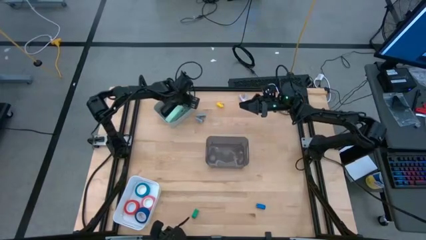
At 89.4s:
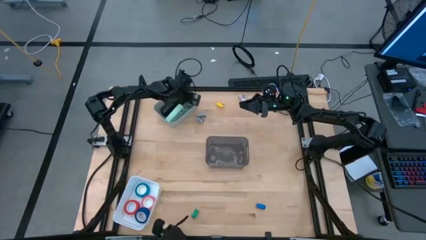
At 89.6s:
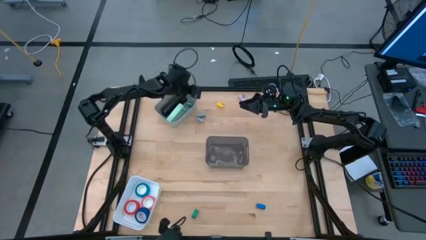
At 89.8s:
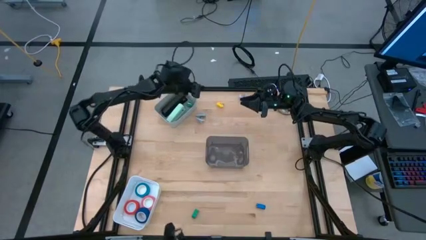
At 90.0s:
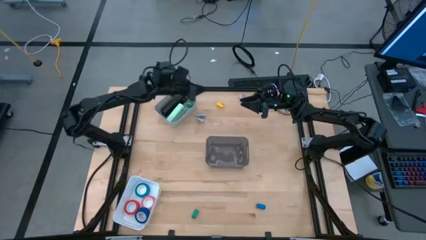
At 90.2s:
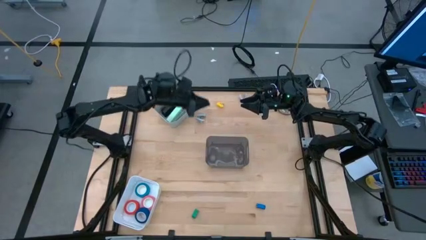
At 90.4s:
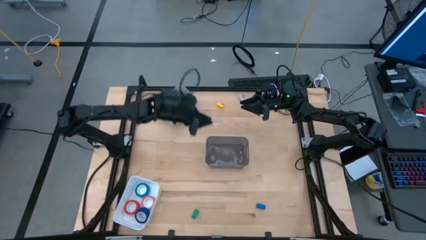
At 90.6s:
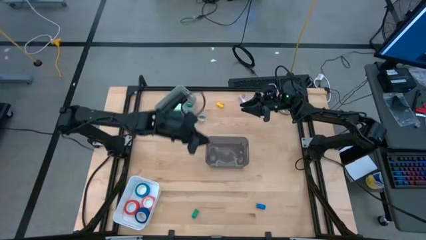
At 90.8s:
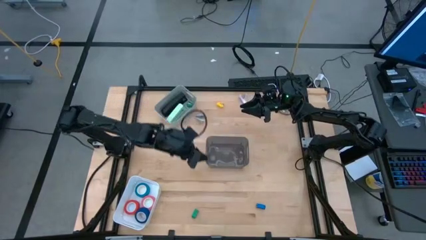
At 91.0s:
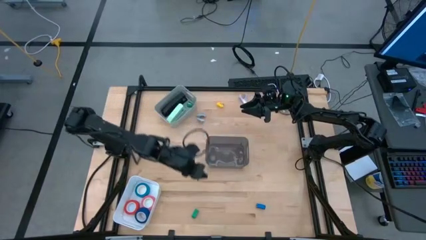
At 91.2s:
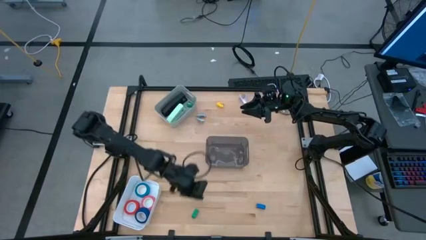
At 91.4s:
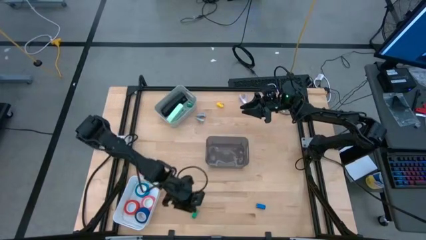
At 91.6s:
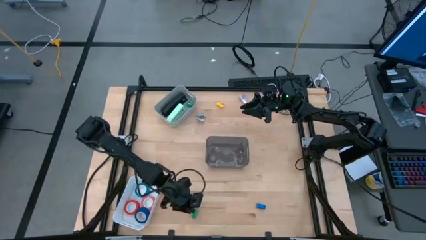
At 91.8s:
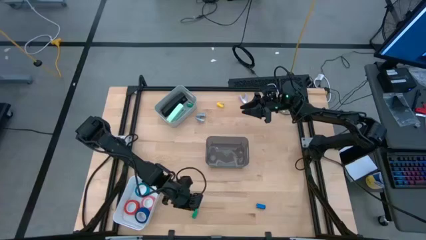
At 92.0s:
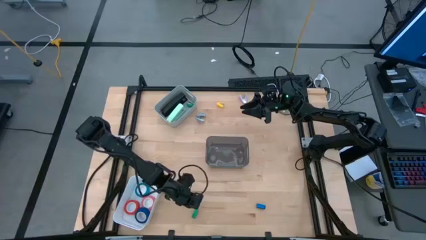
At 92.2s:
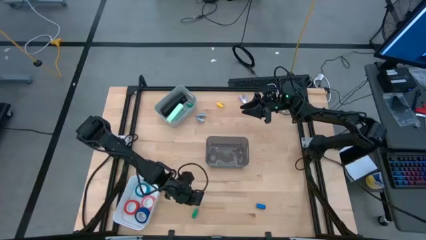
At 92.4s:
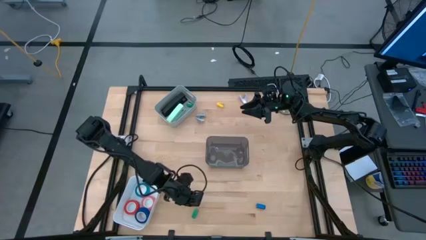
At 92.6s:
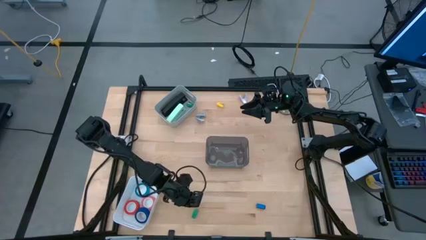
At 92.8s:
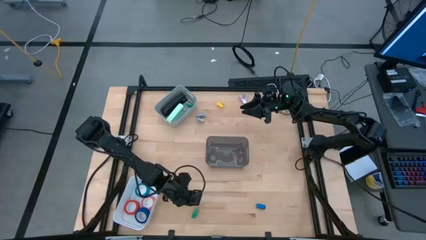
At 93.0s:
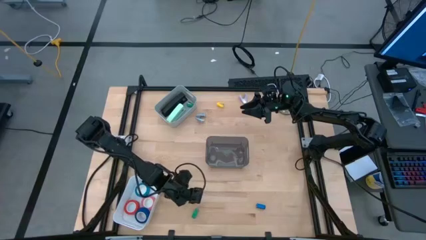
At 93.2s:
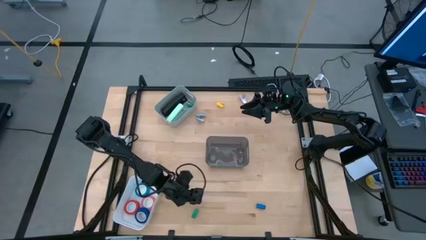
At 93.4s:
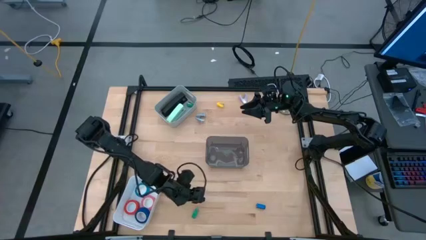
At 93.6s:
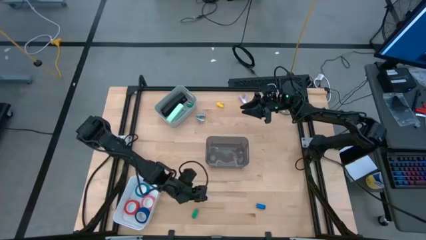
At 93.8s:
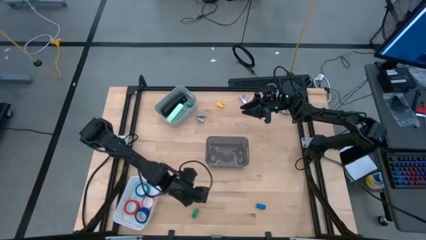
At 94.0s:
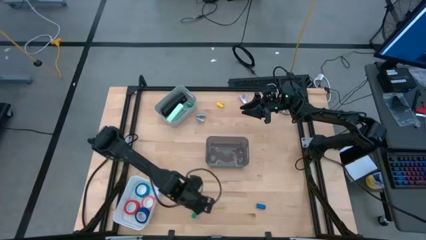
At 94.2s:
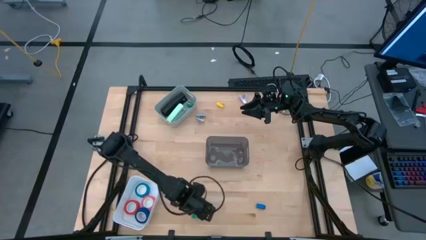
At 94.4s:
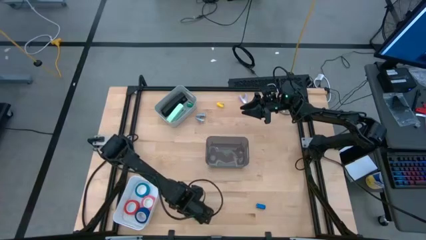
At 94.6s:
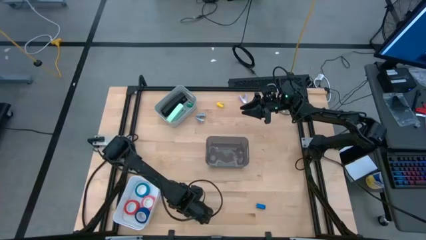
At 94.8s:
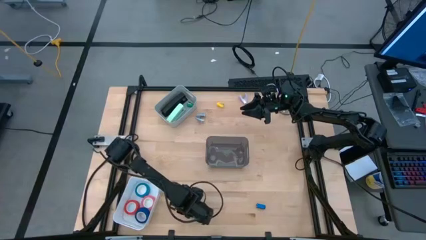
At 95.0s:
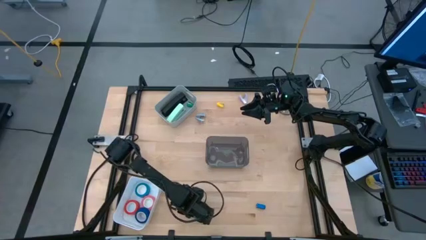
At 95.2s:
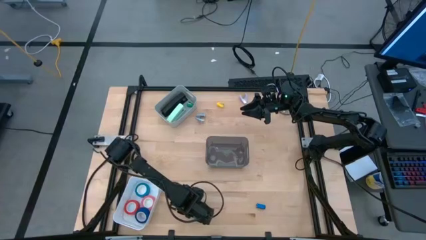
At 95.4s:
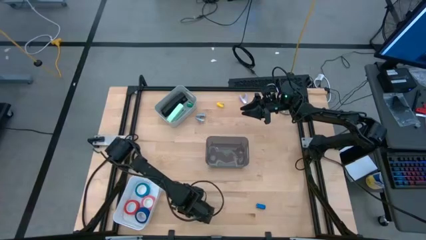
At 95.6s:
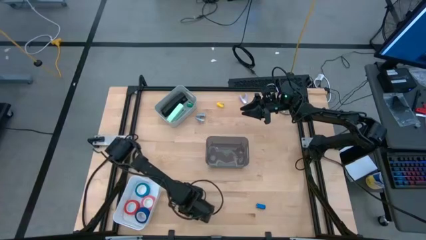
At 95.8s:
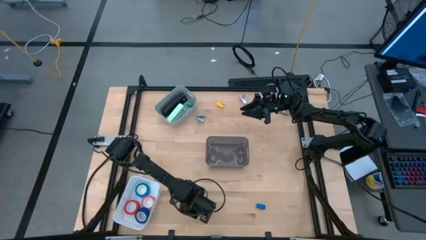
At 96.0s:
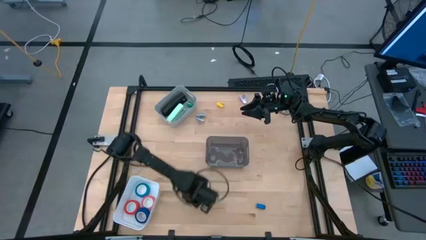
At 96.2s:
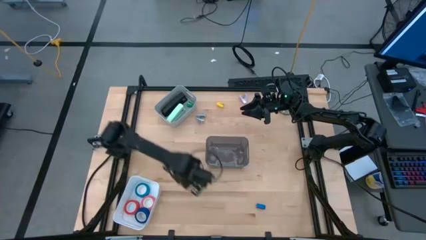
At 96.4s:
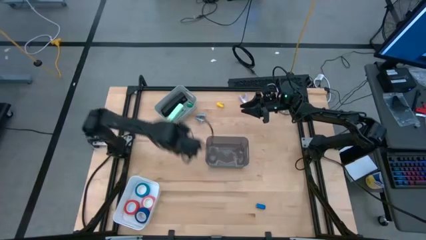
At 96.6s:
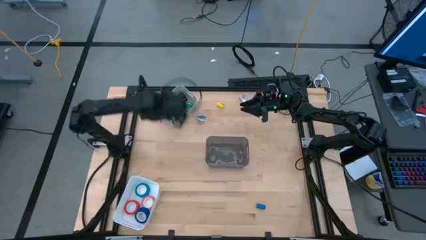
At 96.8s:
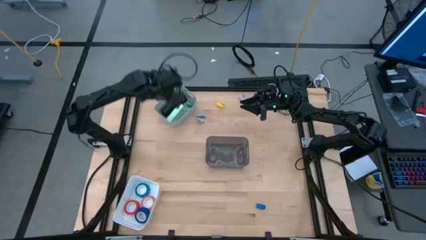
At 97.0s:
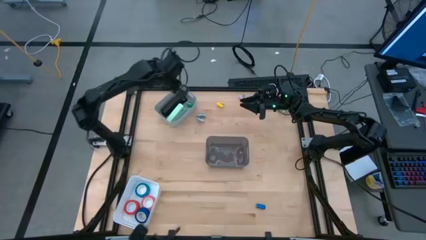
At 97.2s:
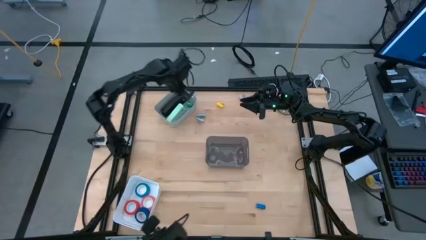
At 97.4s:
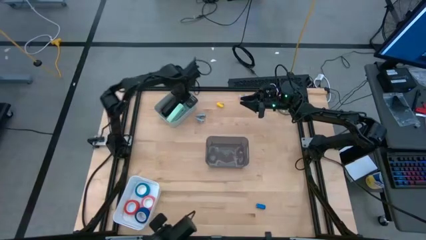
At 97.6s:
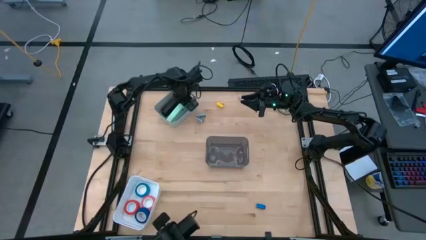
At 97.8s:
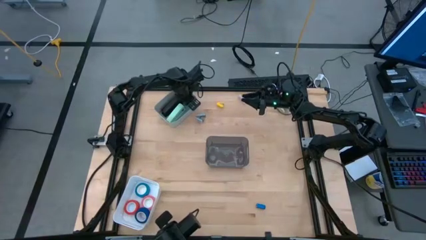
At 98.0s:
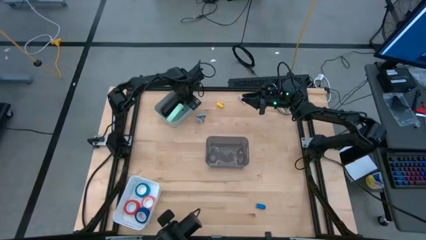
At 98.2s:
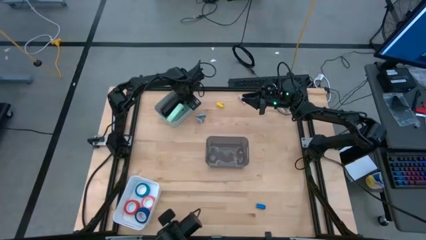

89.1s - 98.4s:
Task: Pick and place Stapler, Stapler remover, tape
Put the green stapler into the gray bin

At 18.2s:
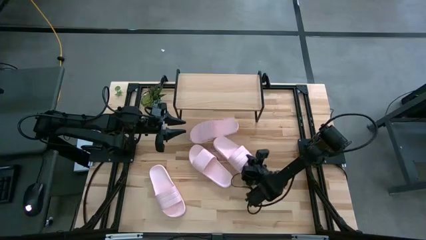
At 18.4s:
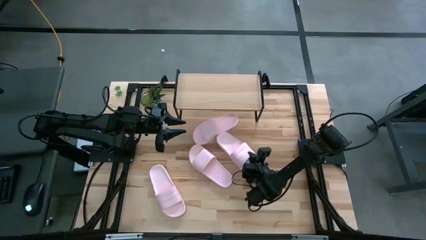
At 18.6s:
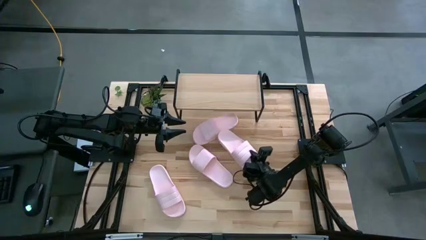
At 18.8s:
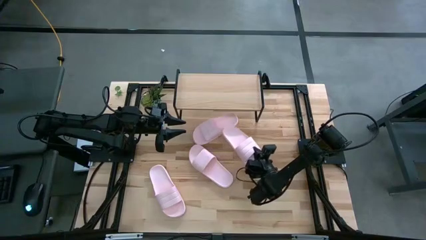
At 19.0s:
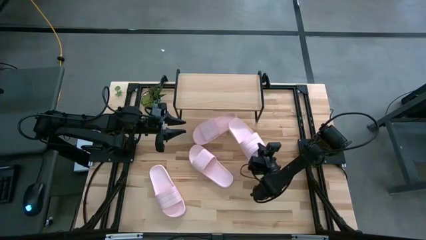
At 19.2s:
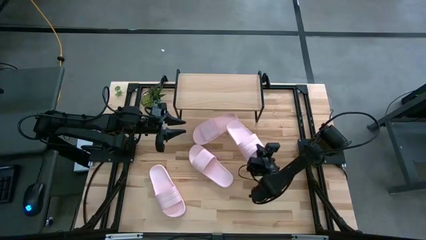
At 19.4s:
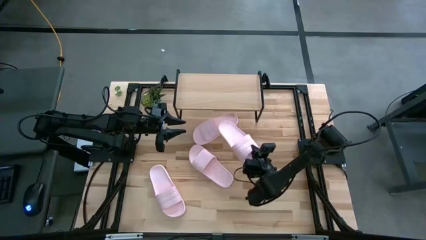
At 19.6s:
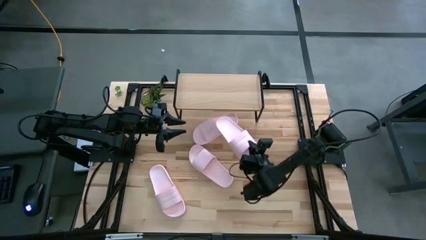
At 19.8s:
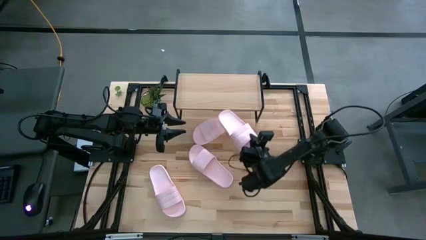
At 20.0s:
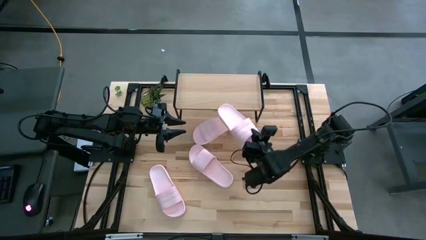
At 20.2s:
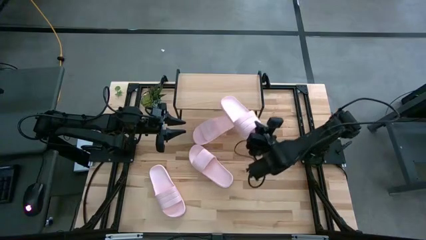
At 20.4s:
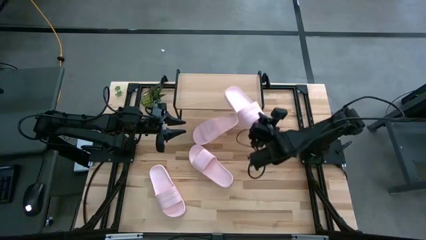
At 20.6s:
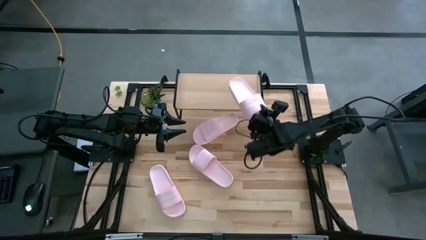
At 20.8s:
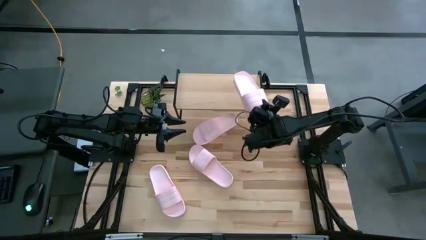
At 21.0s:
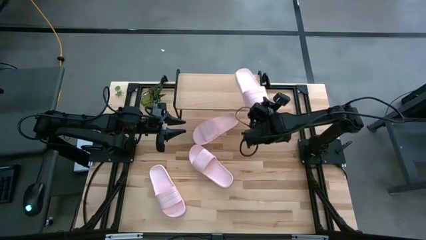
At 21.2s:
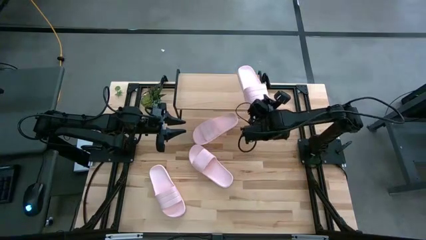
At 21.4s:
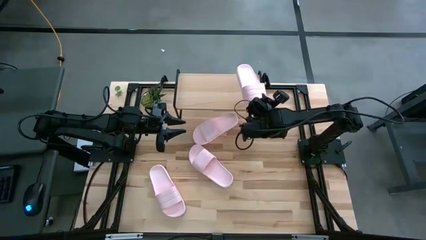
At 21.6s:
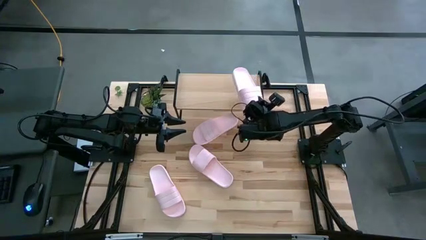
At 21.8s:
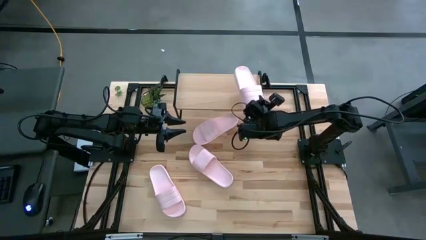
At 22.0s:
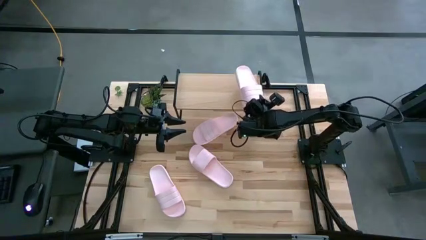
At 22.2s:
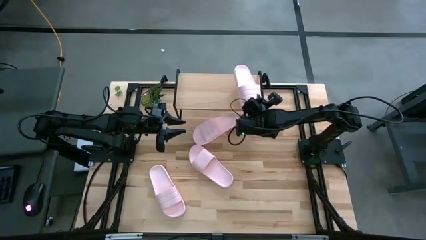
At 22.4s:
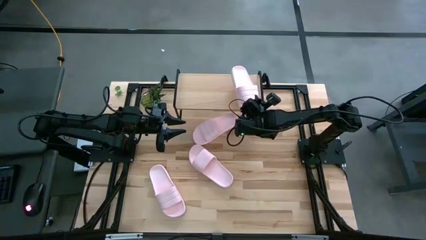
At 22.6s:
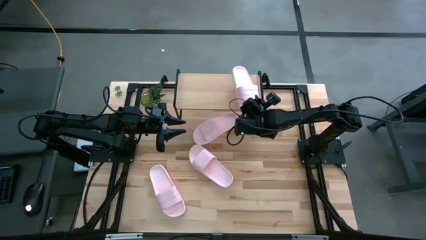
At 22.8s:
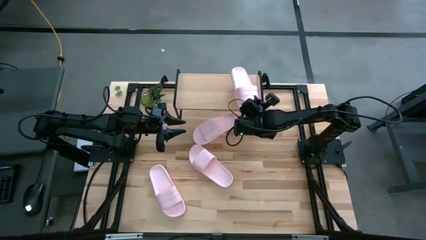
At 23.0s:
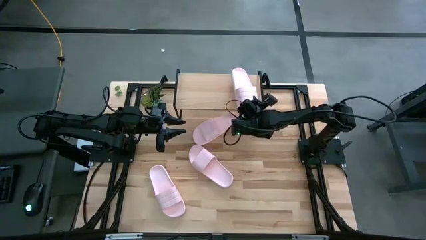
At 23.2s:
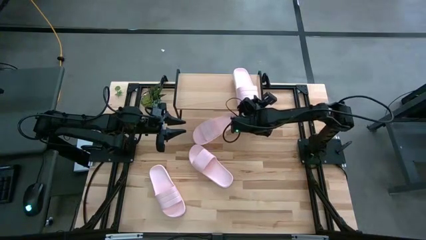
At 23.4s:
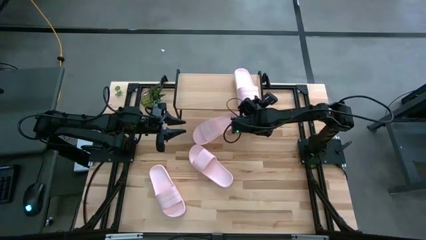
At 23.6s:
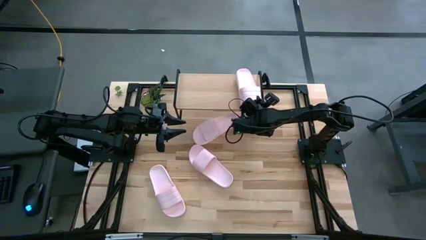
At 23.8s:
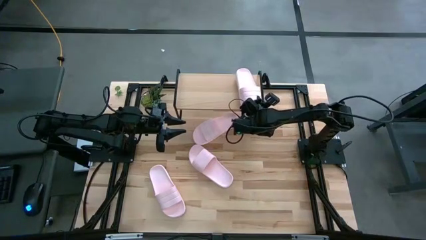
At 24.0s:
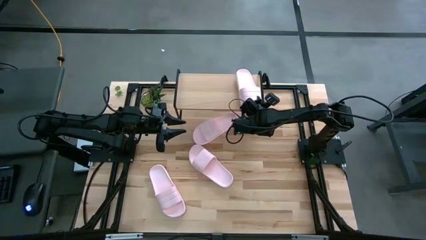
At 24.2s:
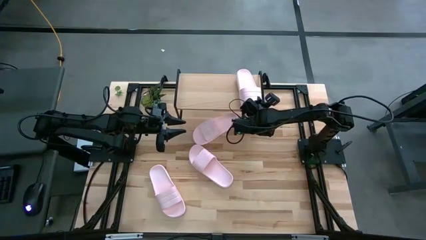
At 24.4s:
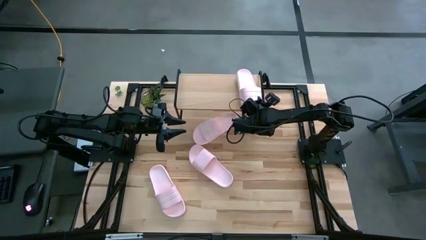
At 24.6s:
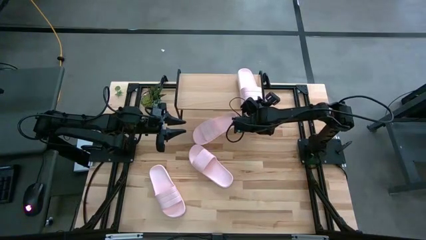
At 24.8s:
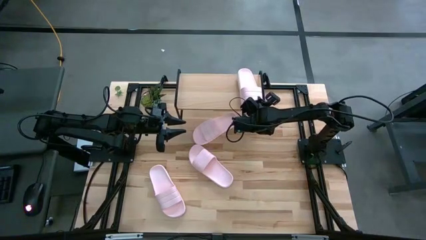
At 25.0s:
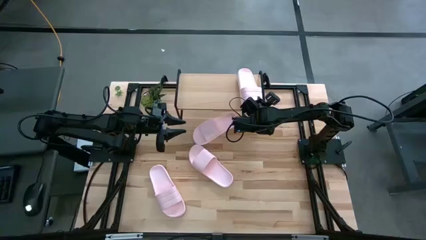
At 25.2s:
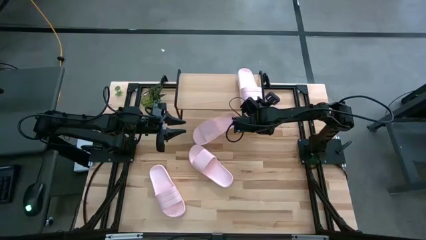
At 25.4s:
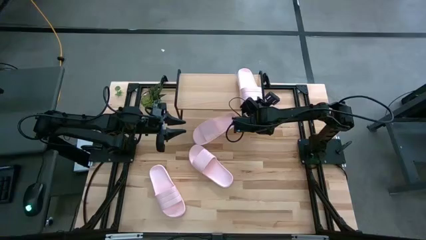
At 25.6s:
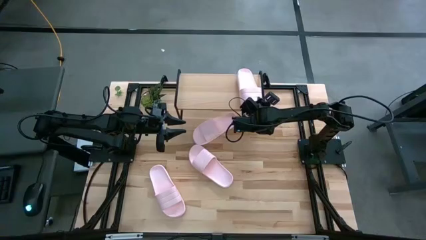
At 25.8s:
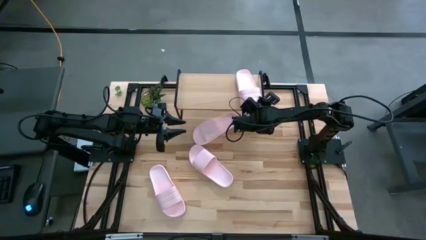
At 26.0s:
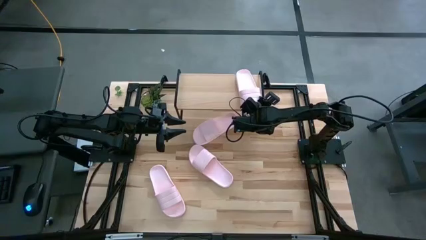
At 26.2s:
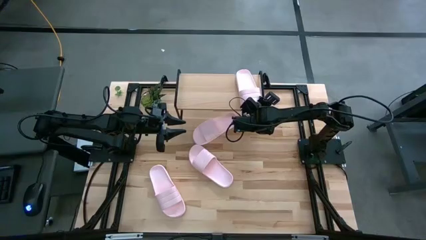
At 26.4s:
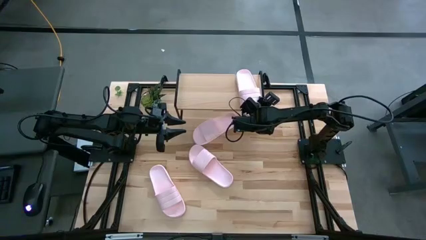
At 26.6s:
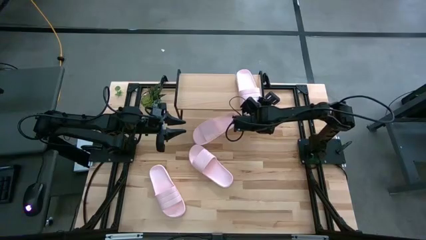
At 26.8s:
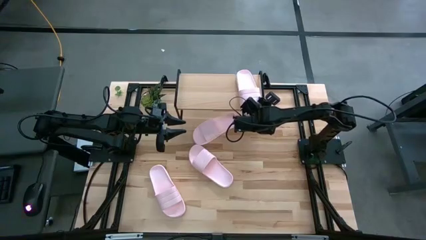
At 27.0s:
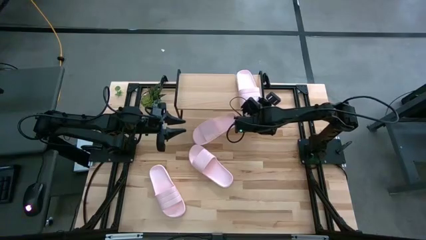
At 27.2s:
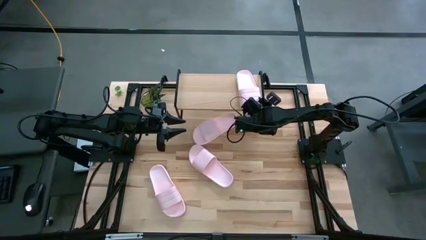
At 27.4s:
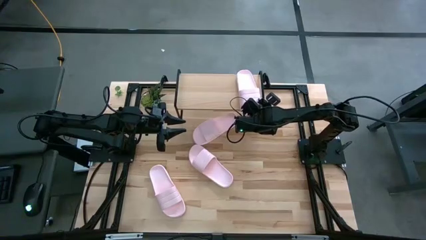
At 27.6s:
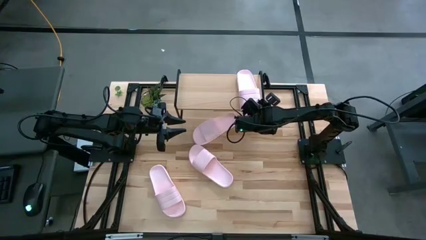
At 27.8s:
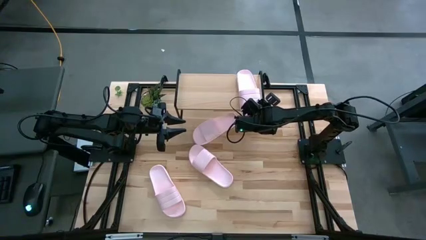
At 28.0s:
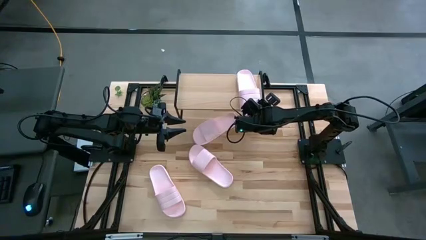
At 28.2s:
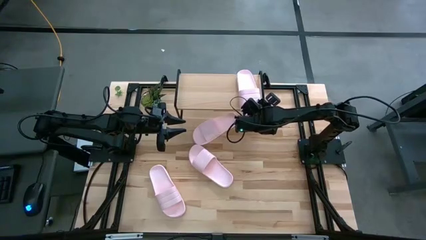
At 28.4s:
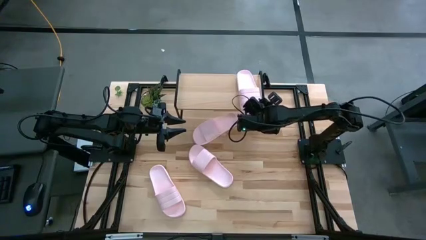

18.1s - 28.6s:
Task: Pick and place slides into the shelf
Put the pink slide on the shelf
